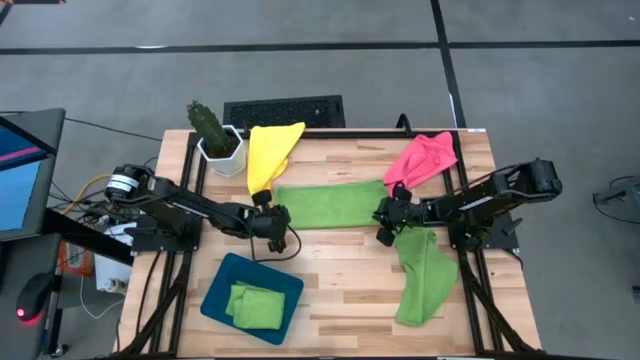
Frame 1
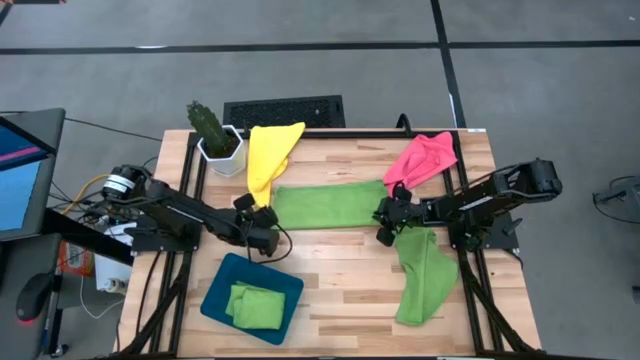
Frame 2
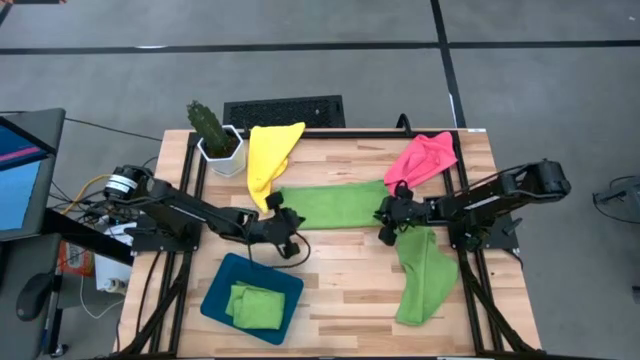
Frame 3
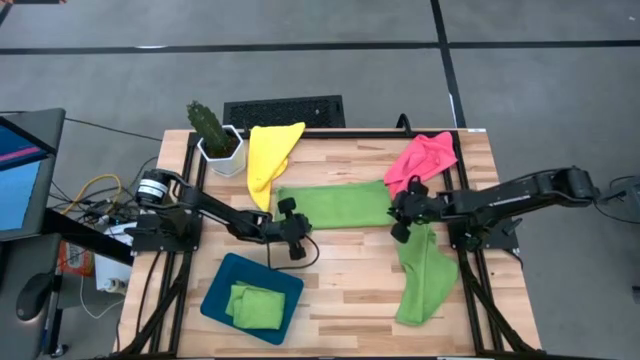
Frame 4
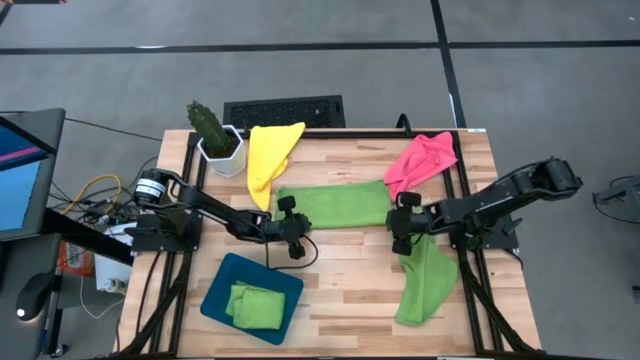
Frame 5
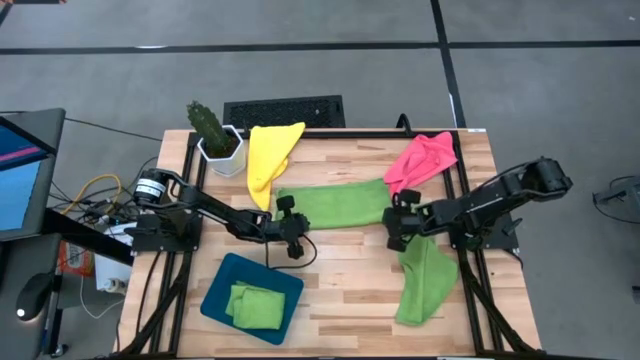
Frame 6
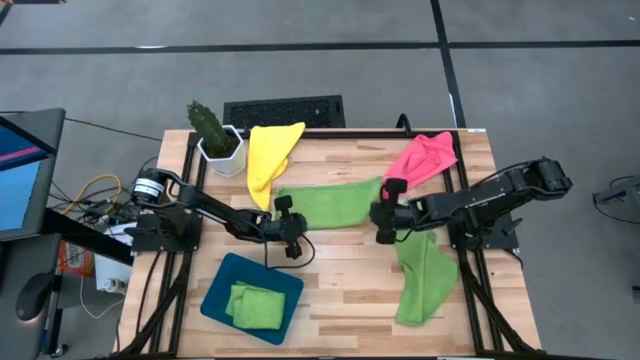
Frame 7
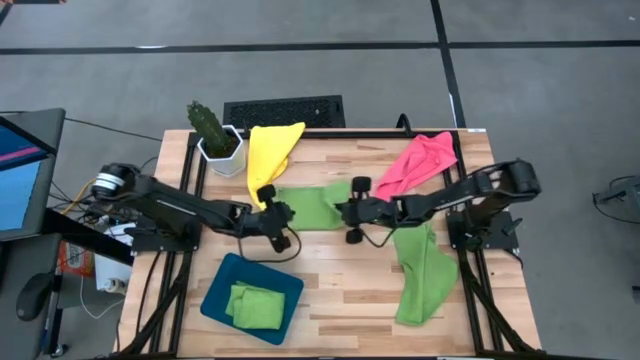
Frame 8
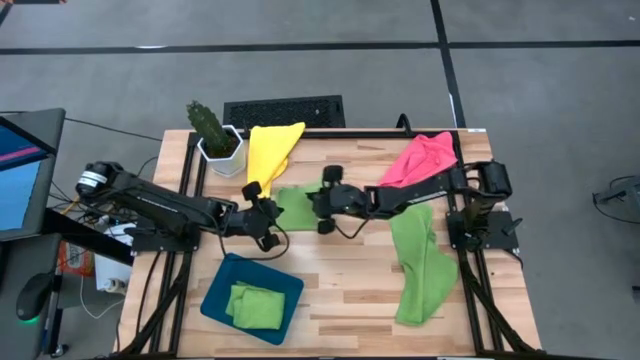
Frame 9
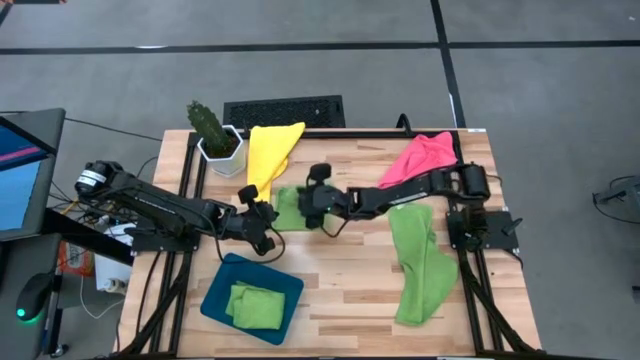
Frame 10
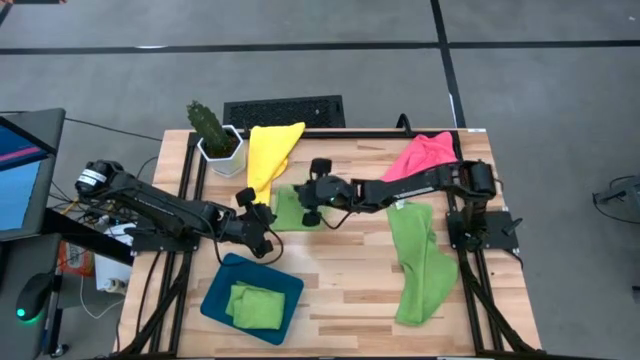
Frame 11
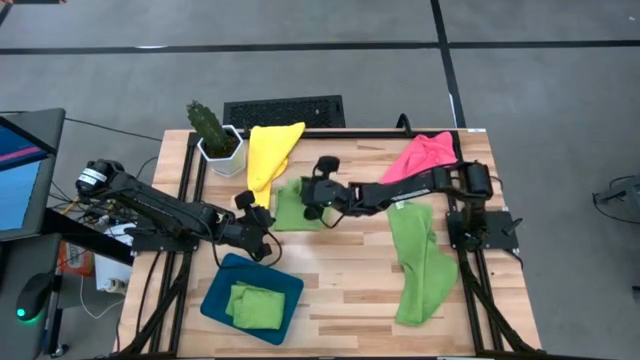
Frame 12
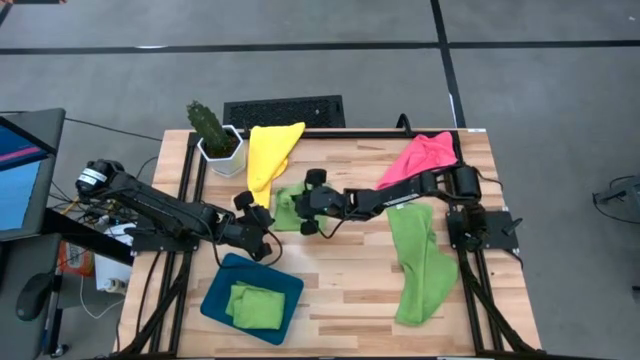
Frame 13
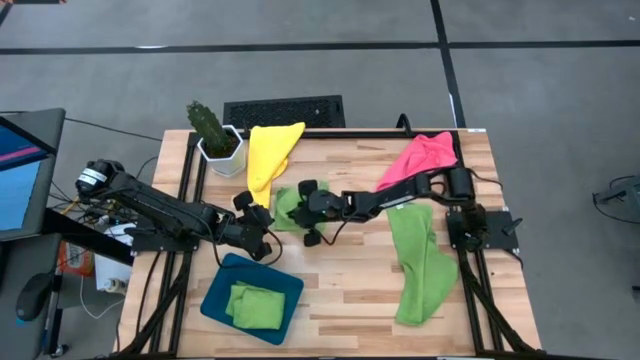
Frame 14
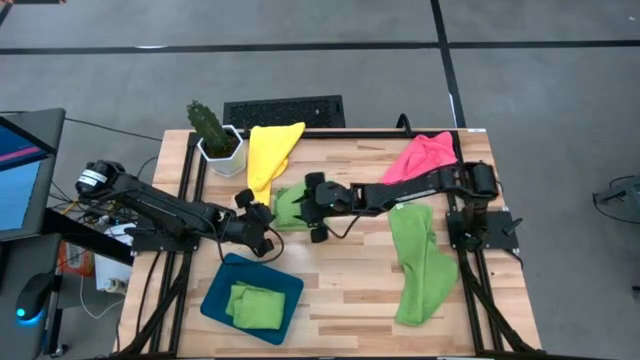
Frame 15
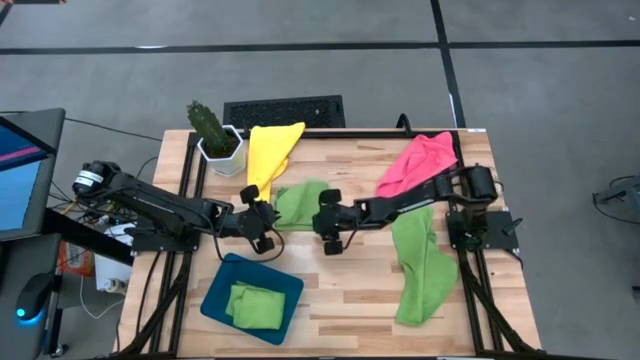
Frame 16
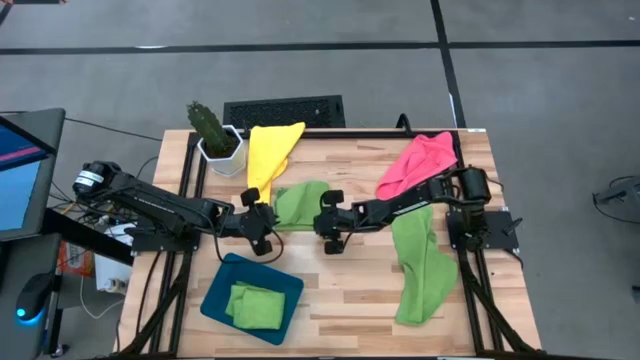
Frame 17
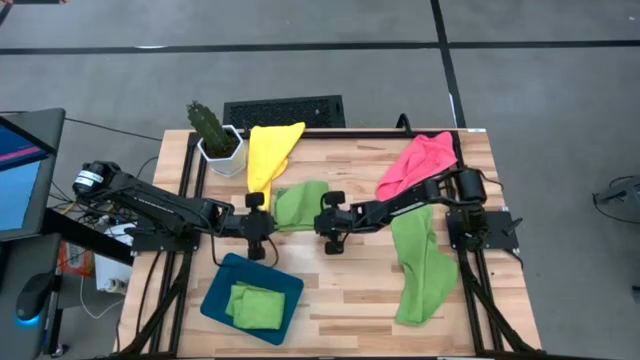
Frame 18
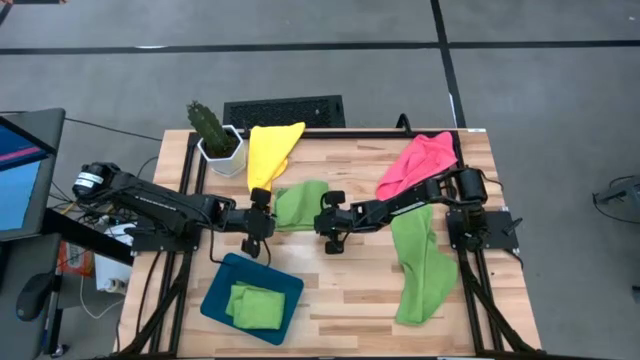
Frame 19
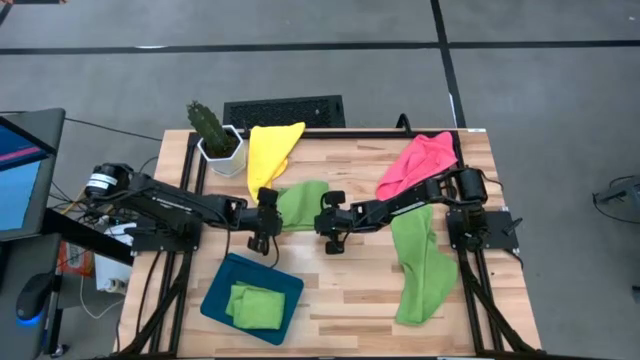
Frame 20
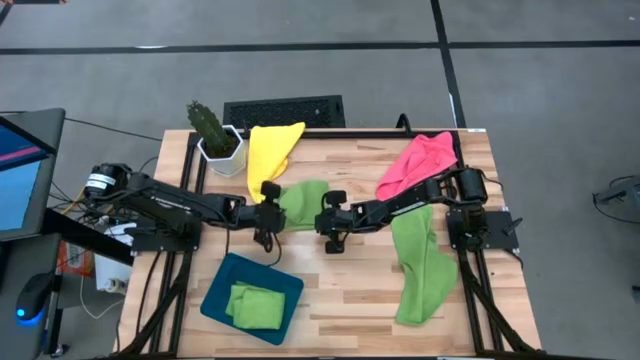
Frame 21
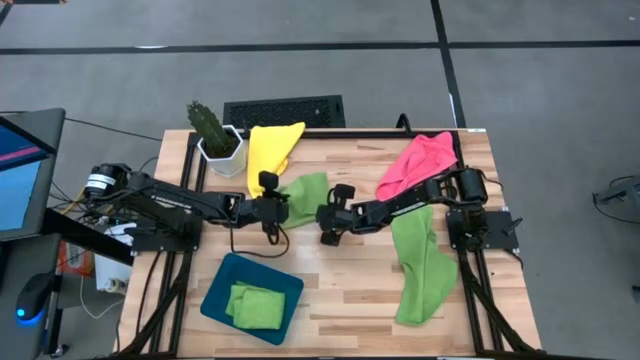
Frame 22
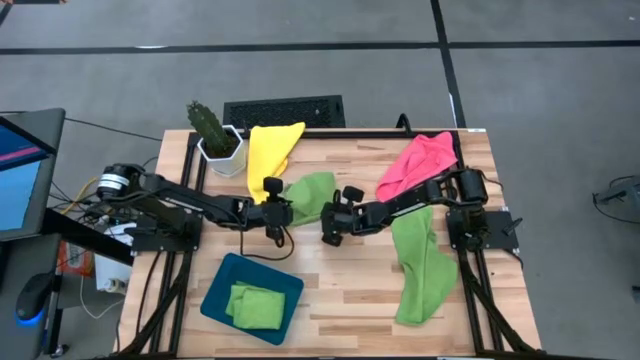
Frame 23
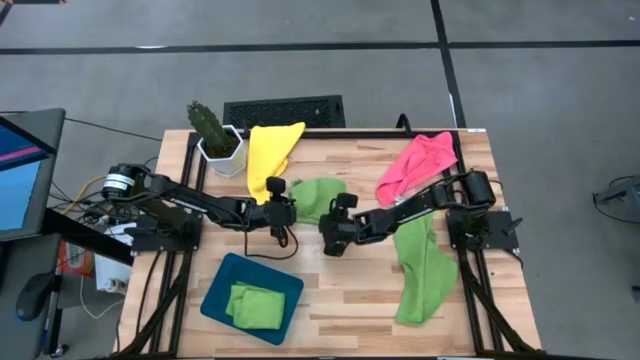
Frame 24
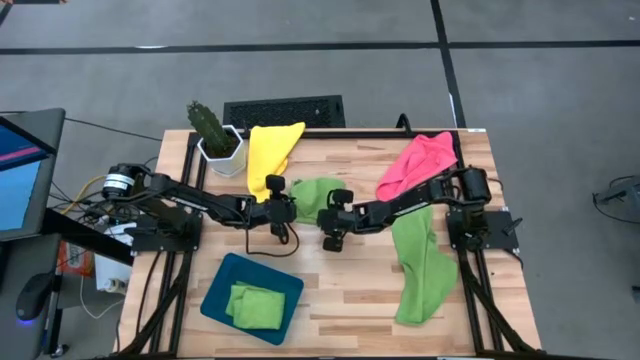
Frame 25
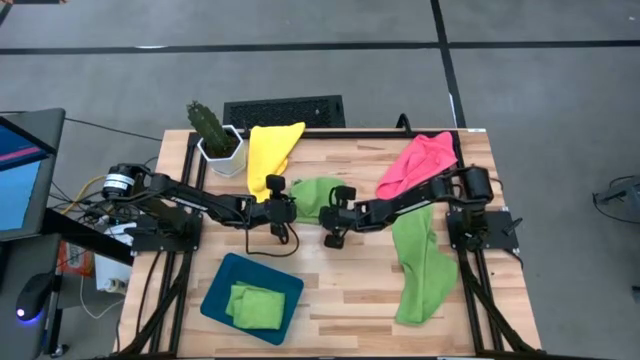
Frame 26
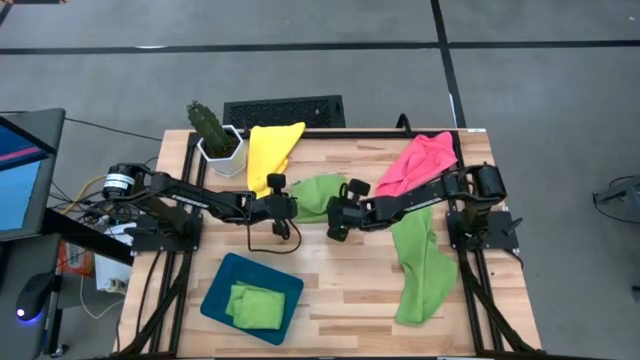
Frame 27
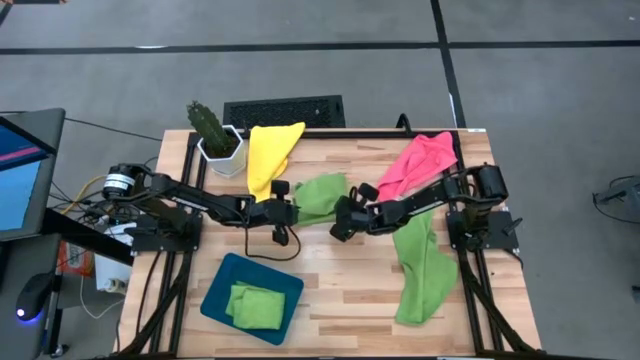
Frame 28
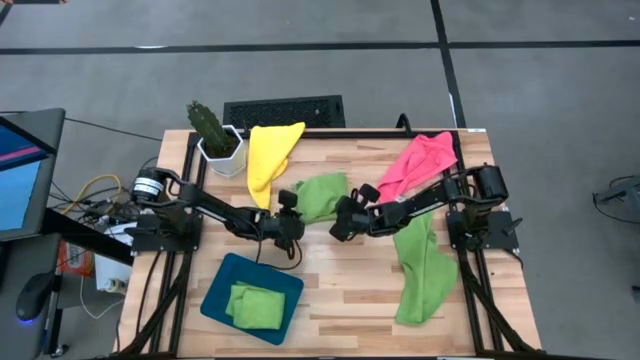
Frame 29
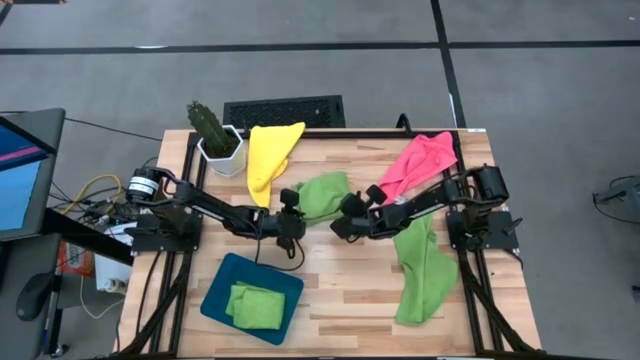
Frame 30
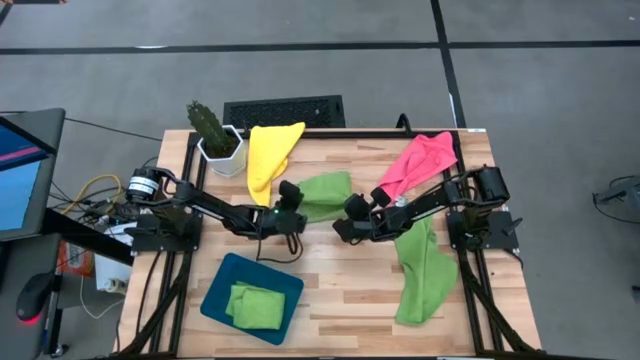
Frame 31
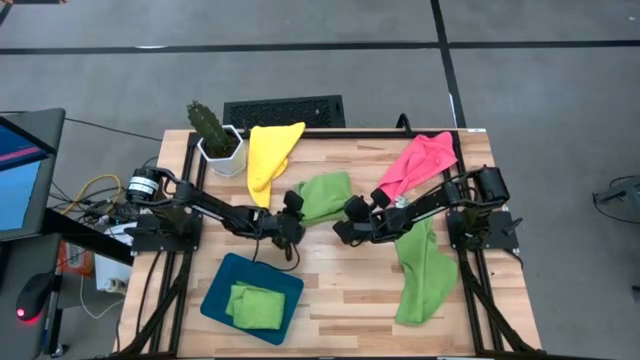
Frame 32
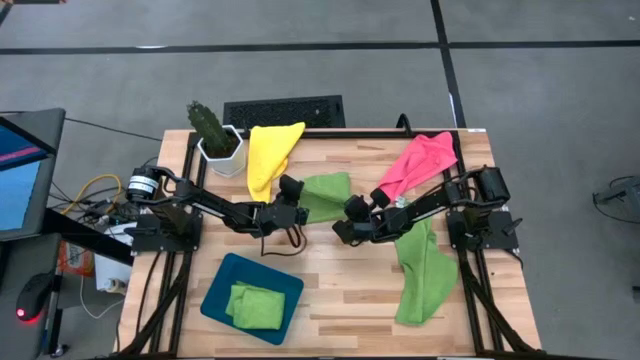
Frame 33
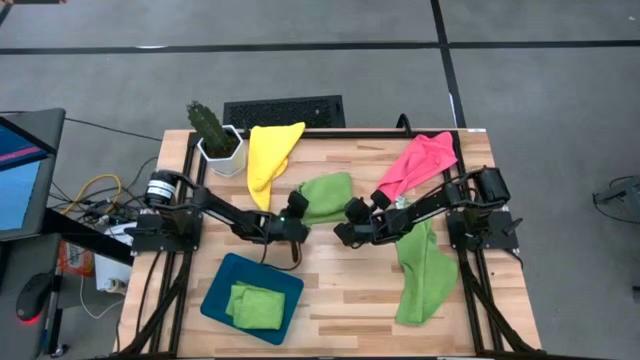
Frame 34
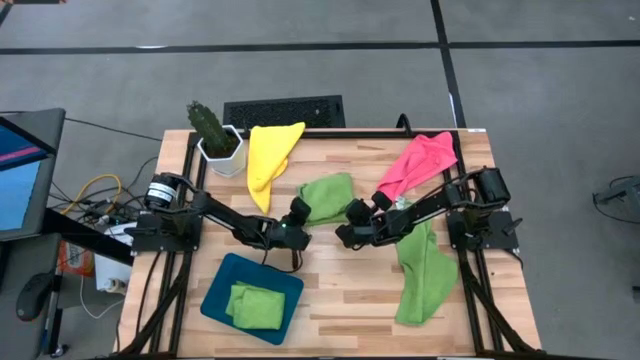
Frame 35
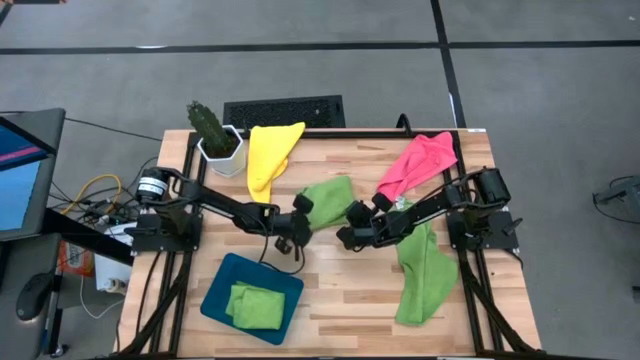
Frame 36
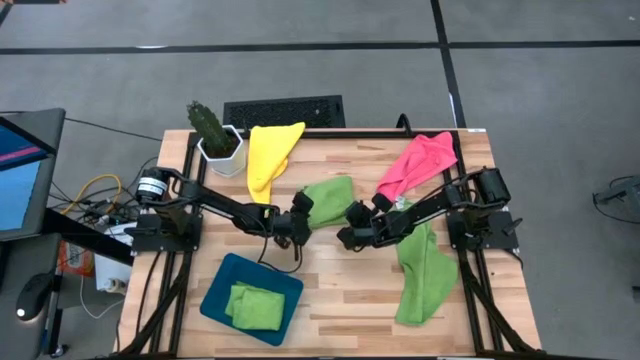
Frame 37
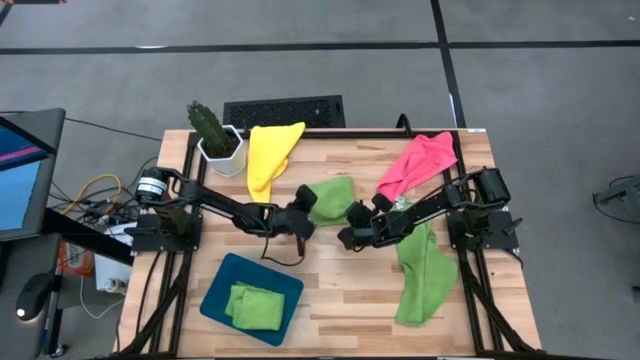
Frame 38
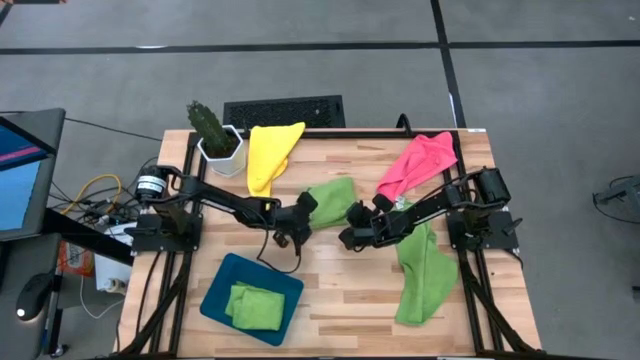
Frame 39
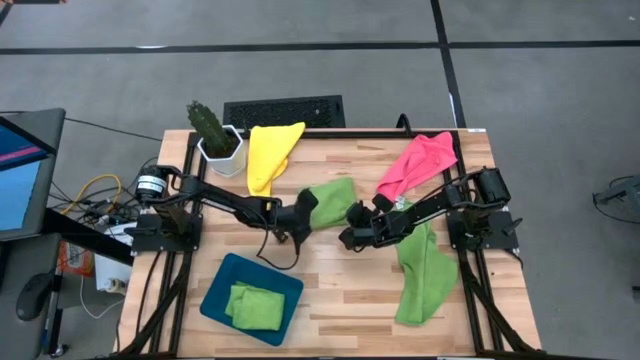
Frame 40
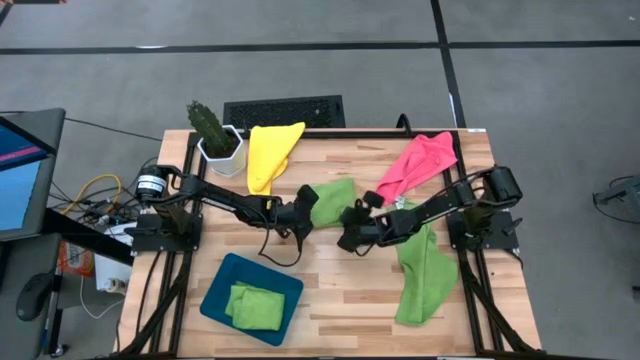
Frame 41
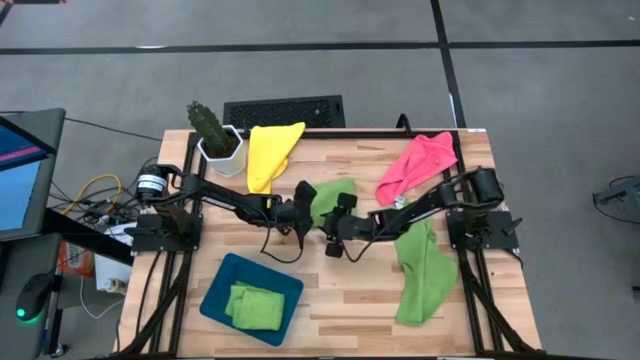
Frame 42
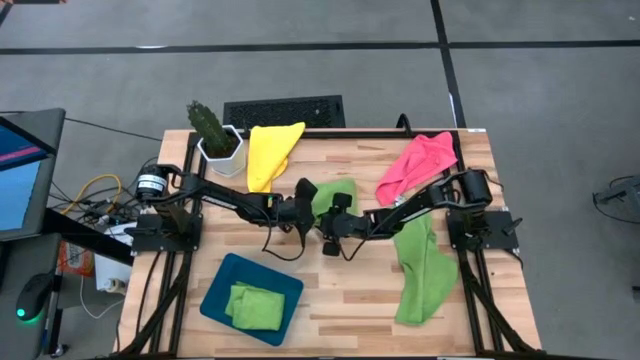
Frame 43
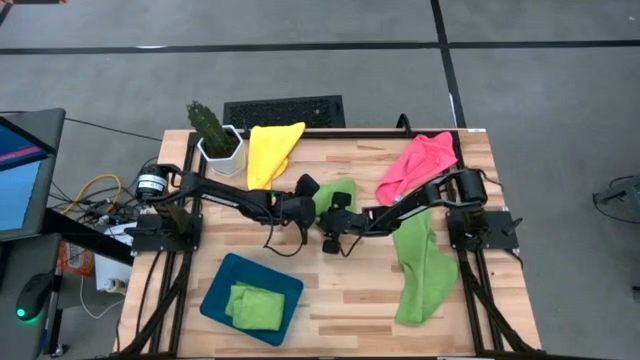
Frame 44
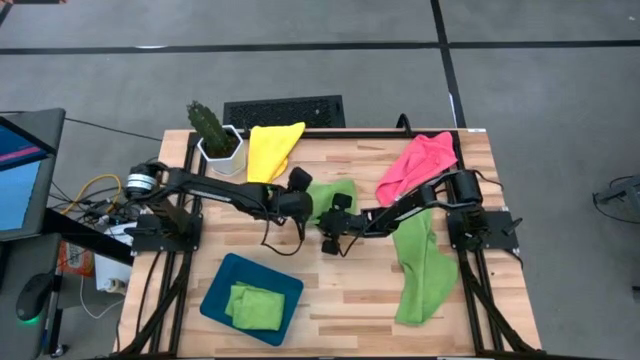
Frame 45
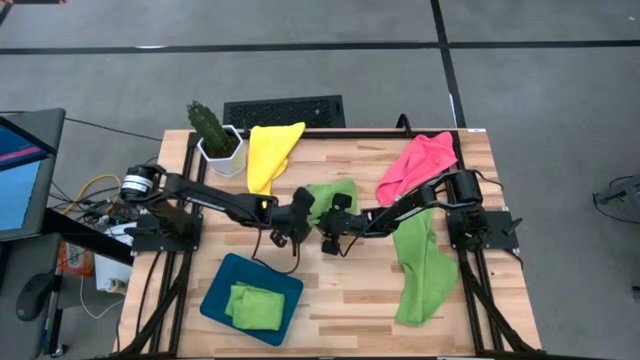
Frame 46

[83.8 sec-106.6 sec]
Task: Fold microfiber towels
Fold the top green microfiber
